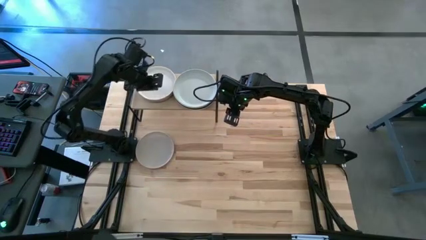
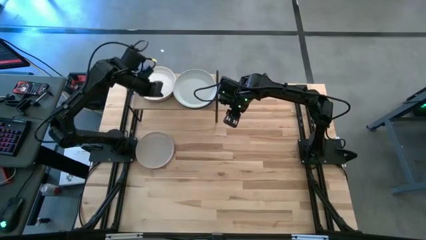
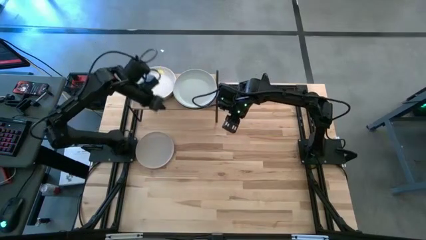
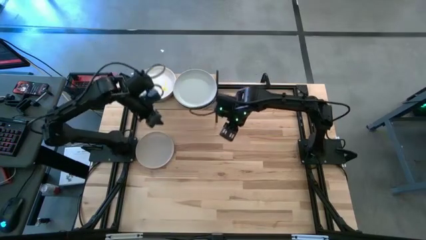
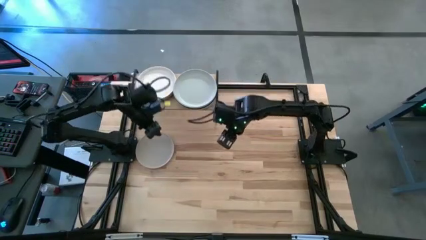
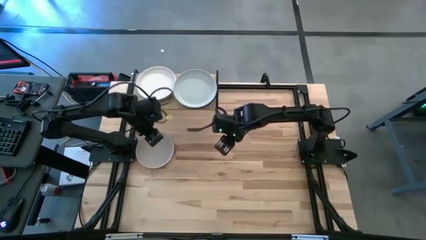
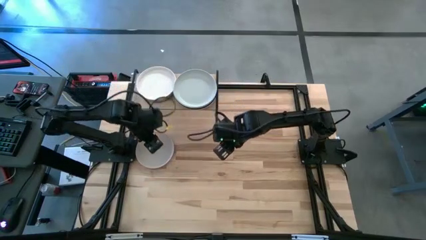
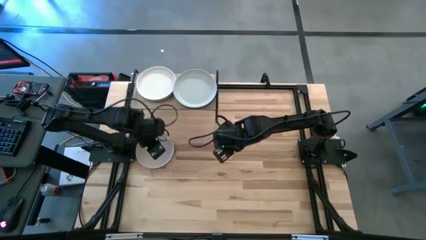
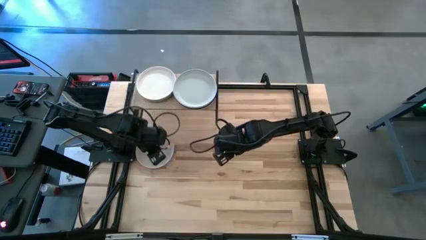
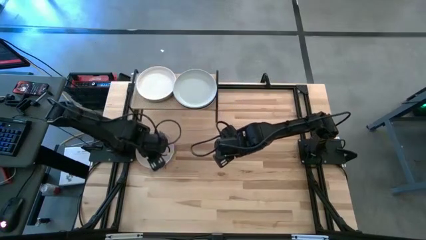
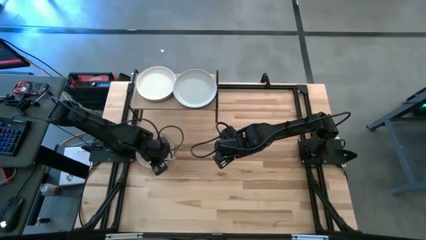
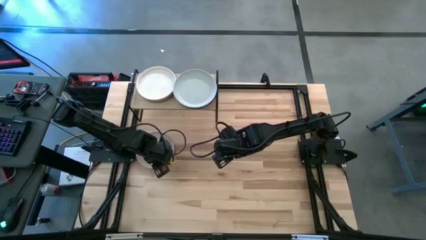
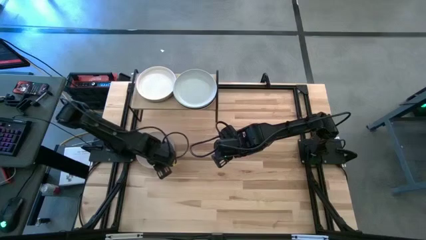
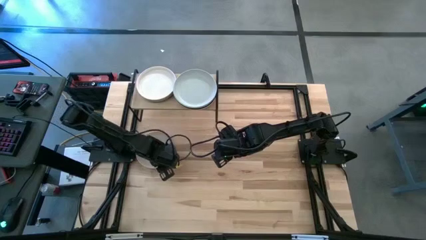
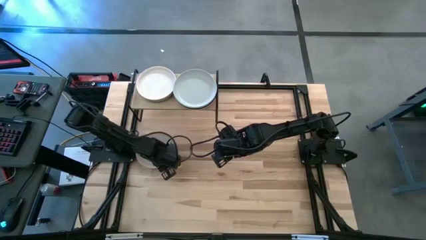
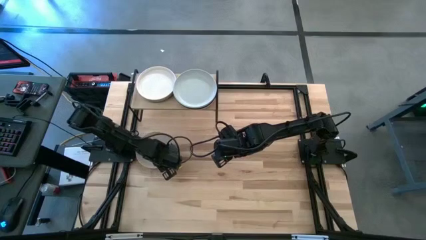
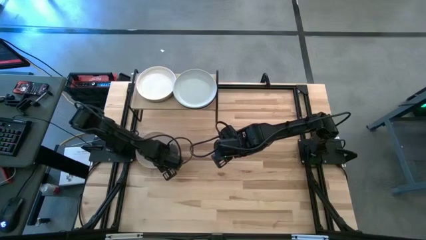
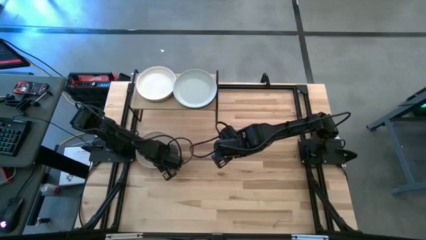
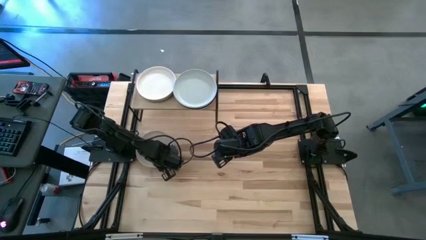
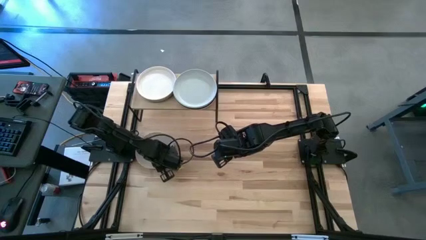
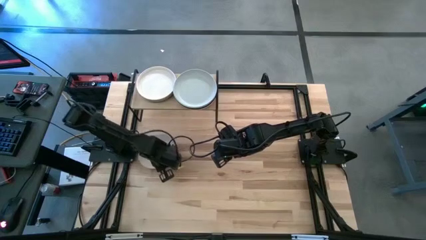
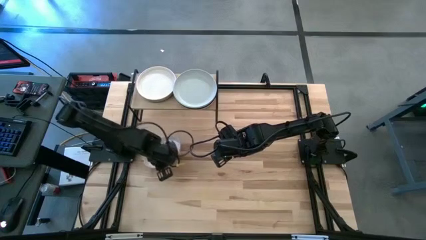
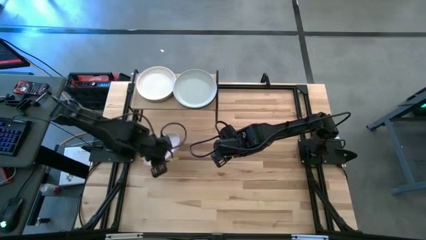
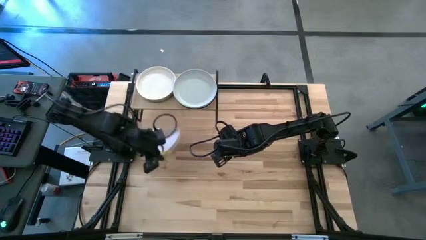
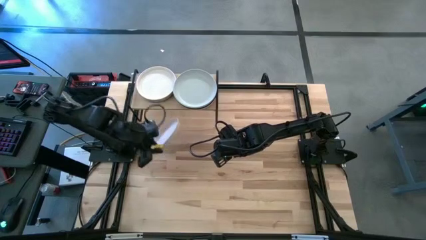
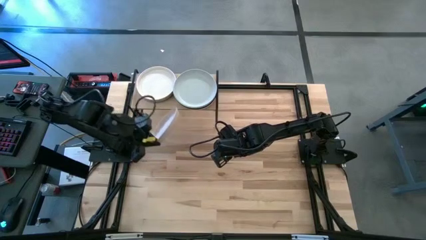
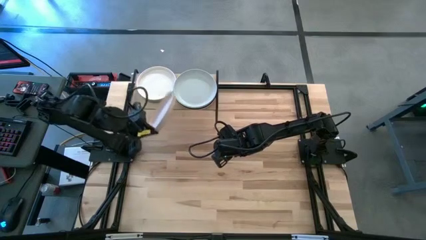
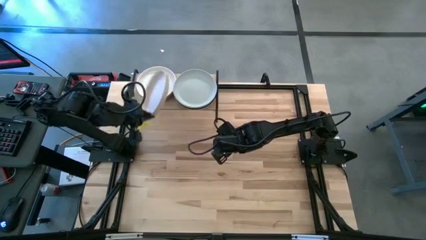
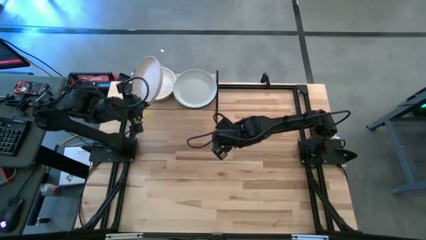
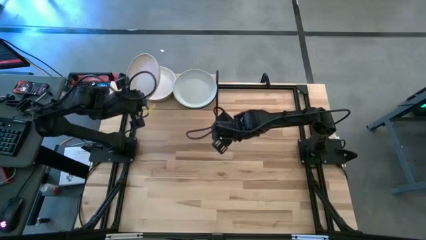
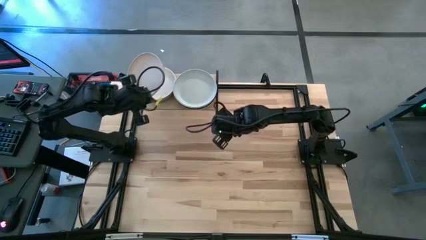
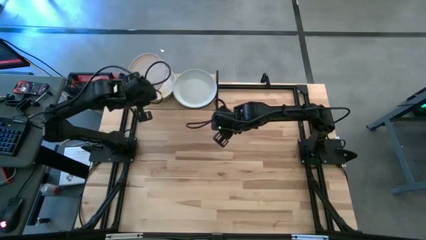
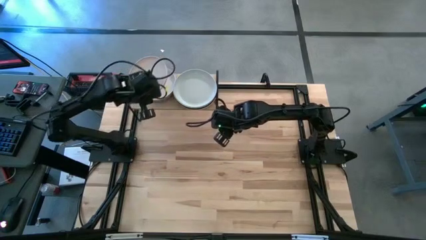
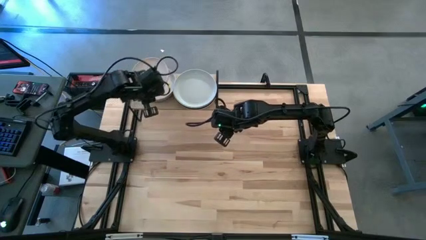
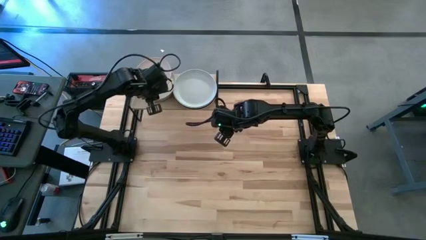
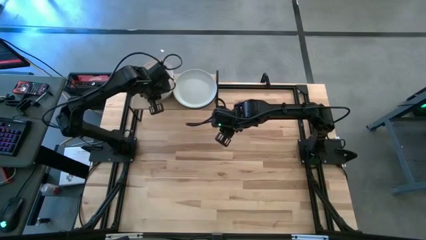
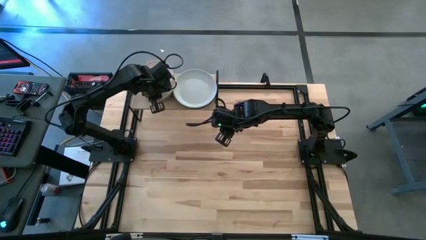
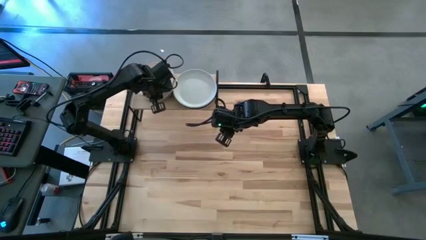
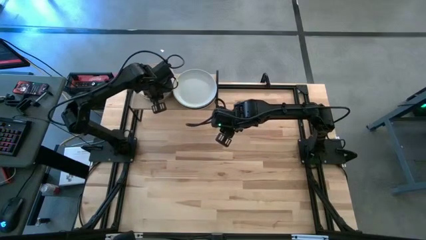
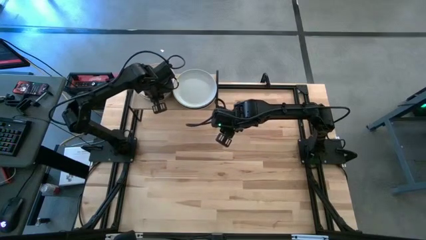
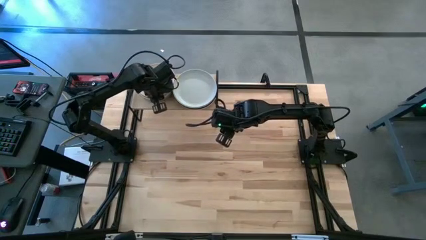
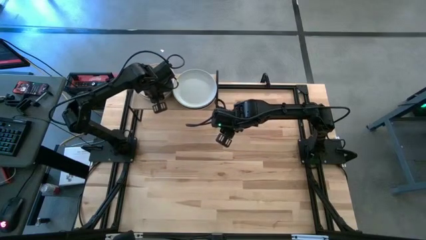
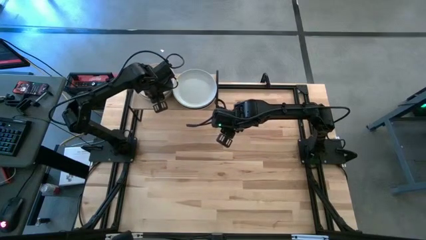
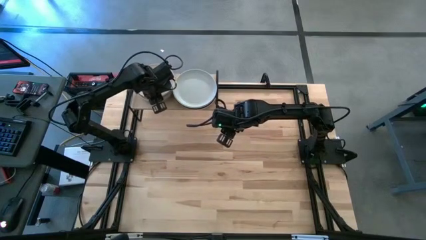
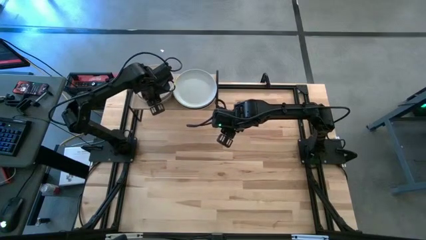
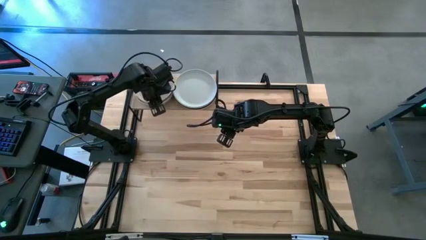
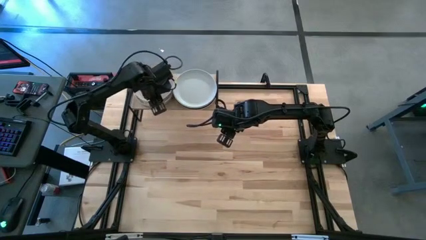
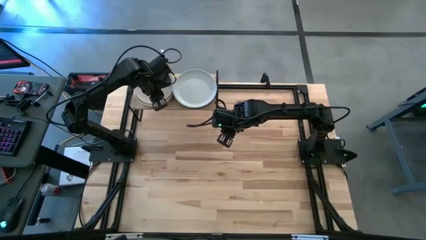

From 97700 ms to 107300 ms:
Task: Place and stack plates onto a shelf
Stack the brown plate into the white plate on the shelf

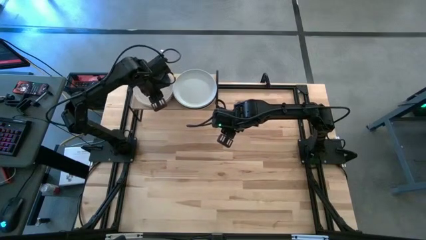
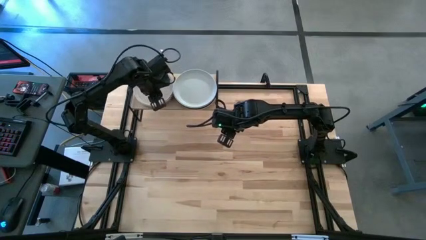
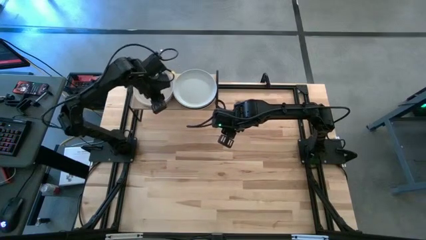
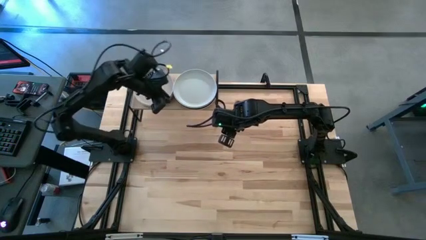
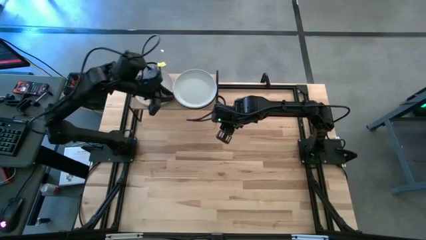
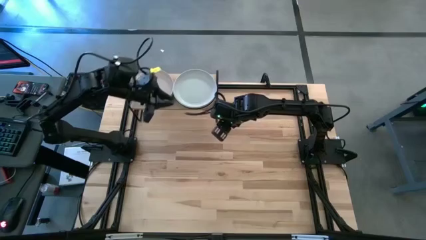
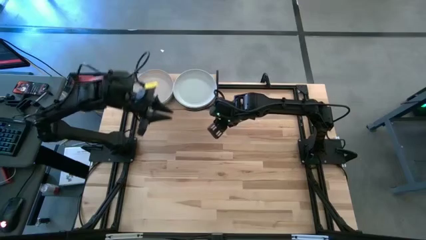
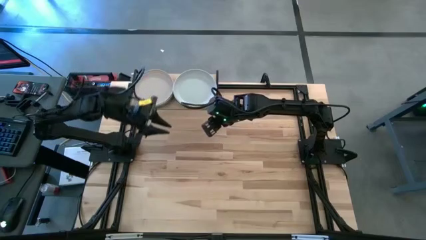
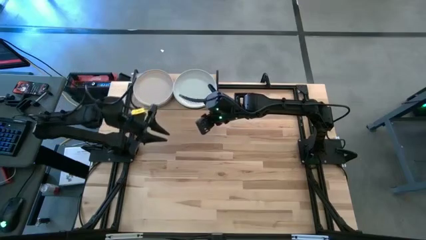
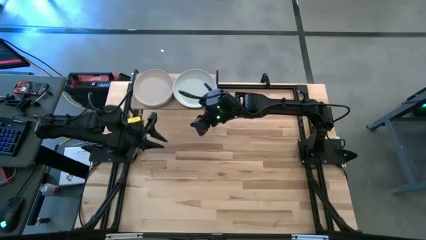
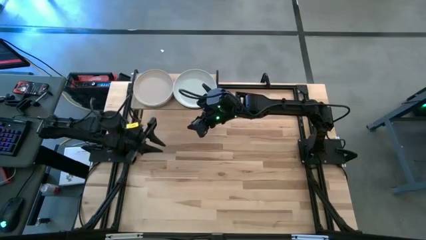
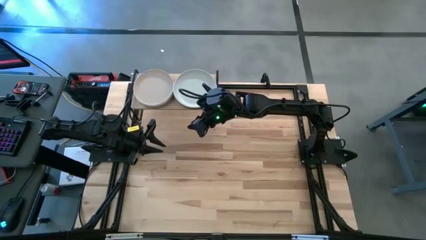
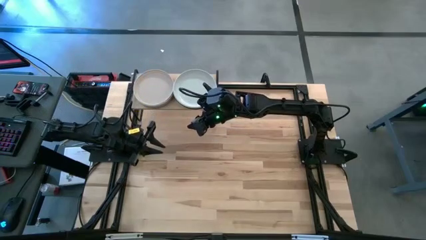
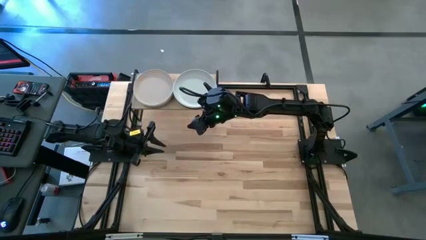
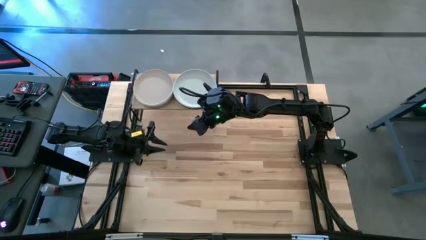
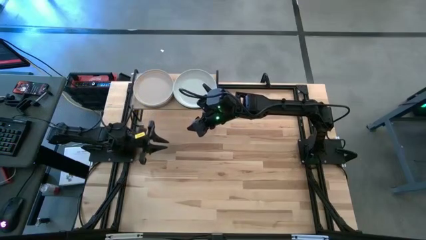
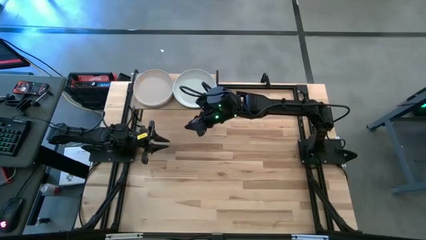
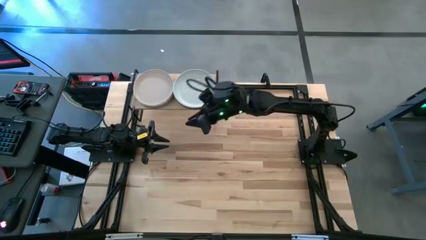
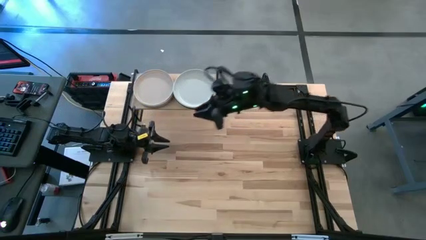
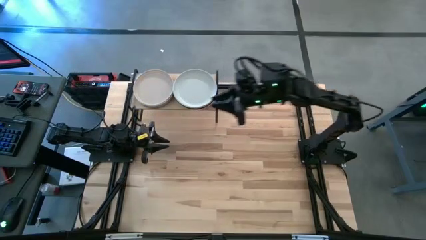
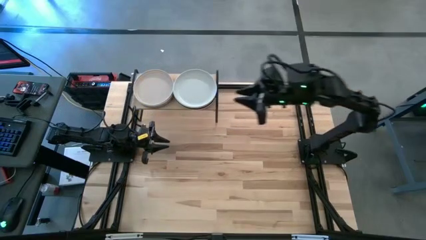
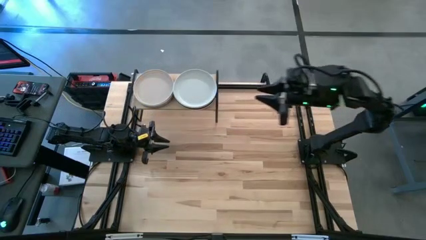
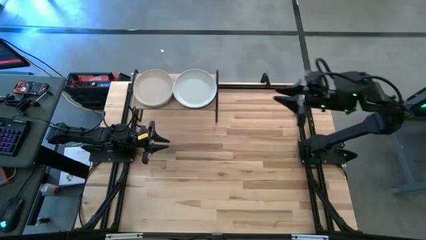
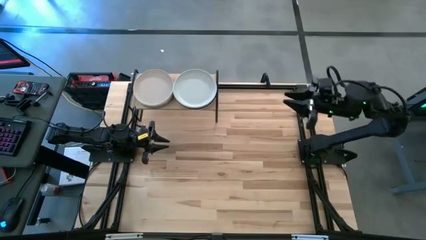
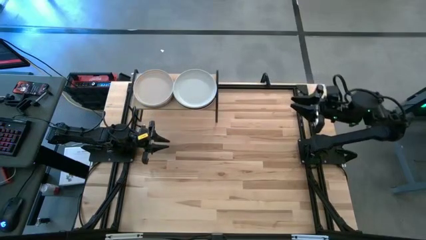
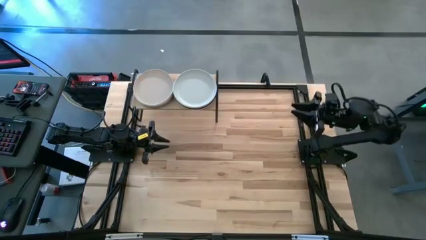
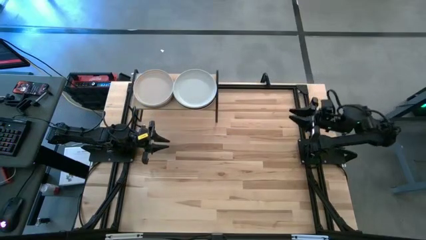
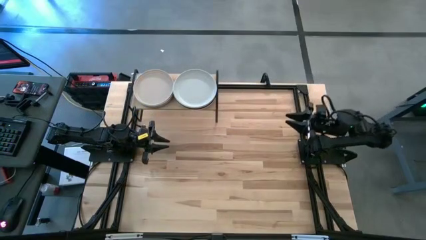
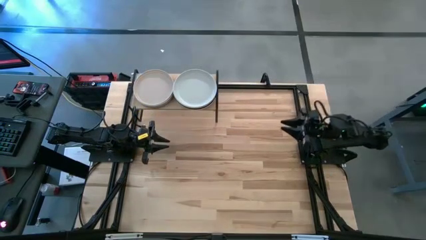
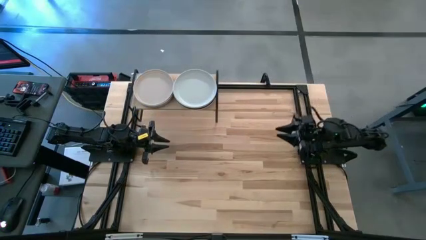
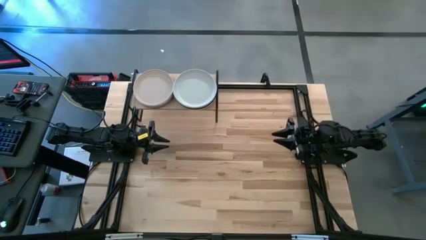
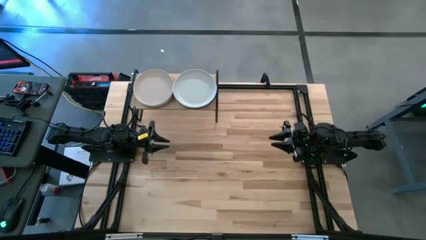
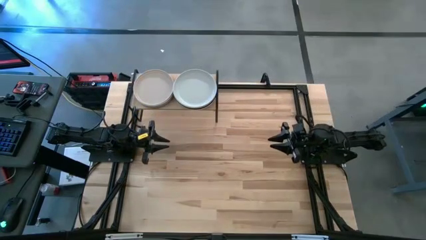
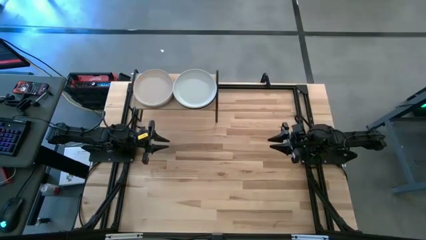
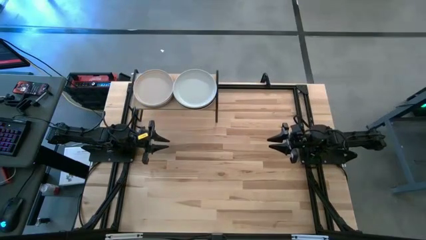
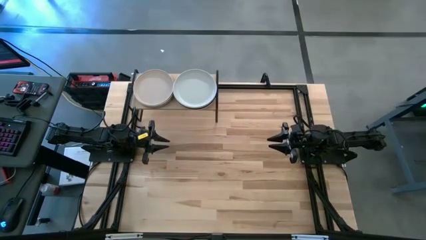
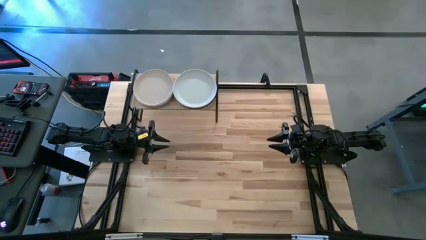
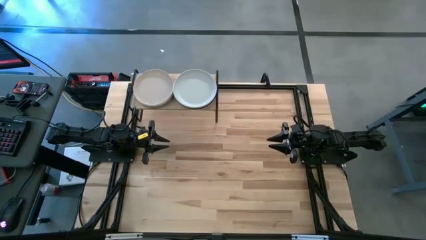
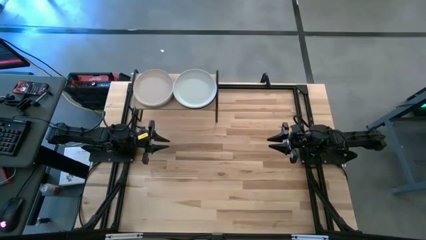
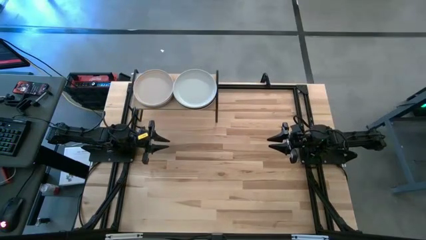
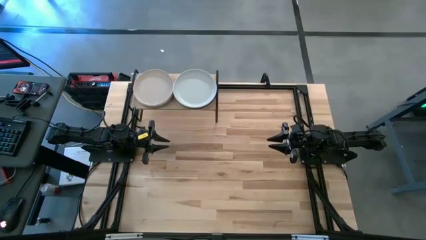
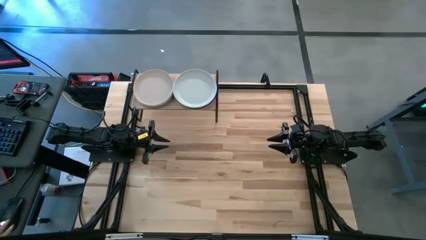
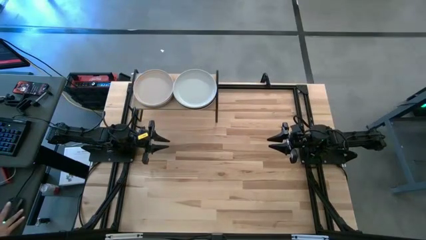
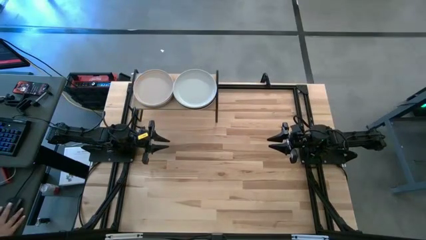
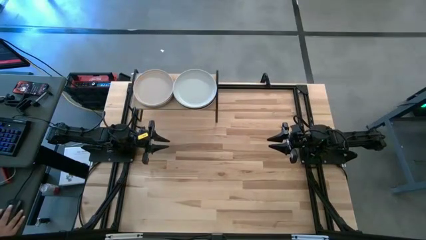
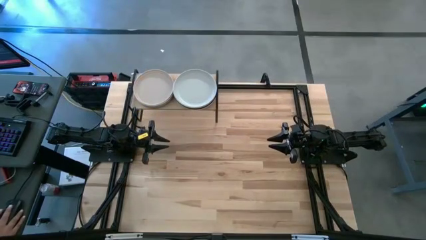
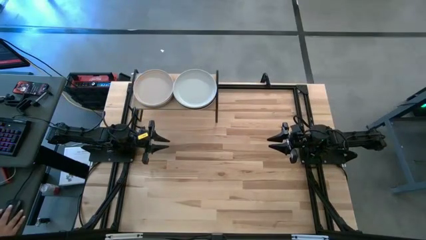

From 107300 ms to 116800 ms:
Return to Home Position
